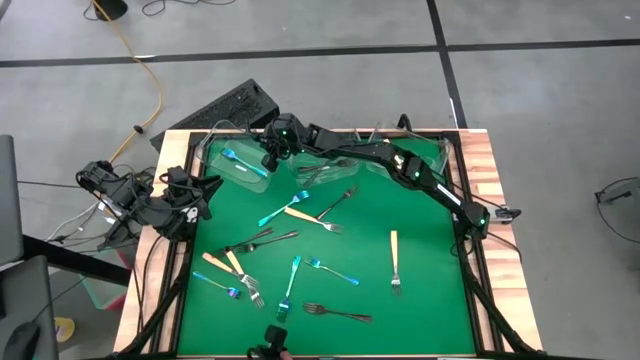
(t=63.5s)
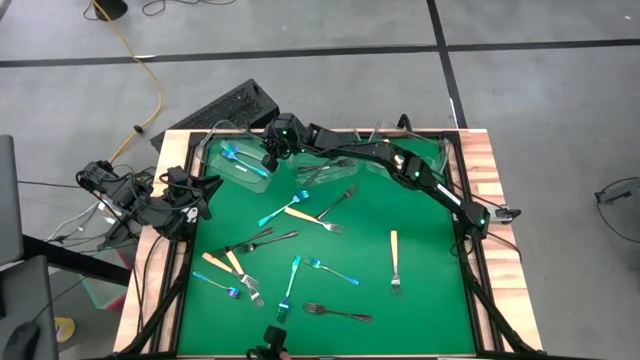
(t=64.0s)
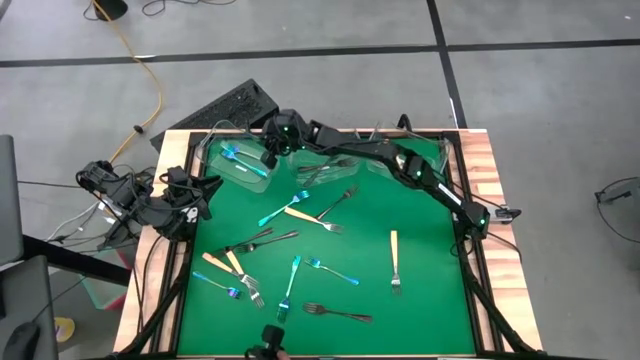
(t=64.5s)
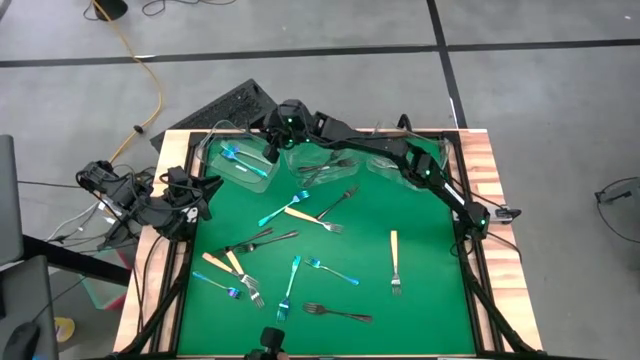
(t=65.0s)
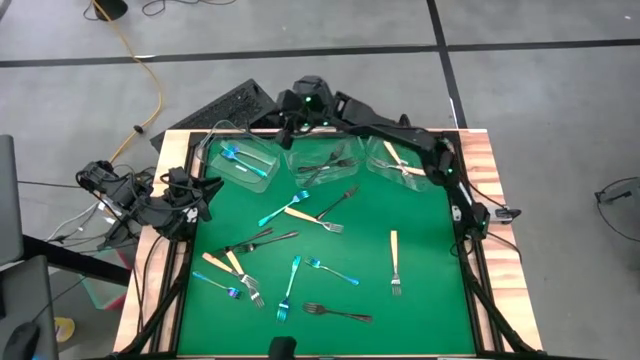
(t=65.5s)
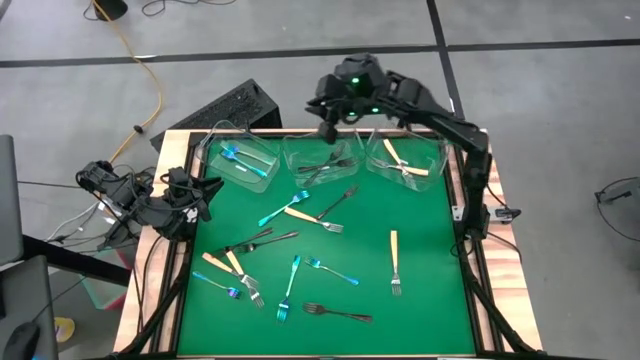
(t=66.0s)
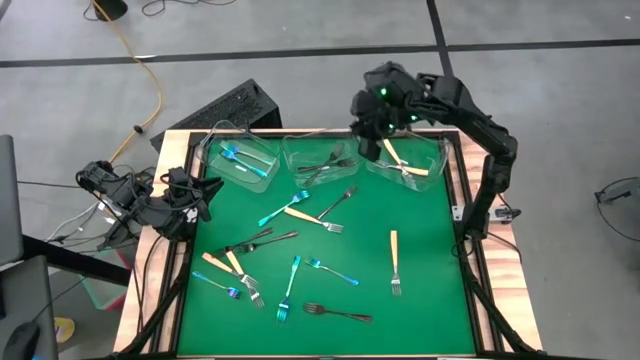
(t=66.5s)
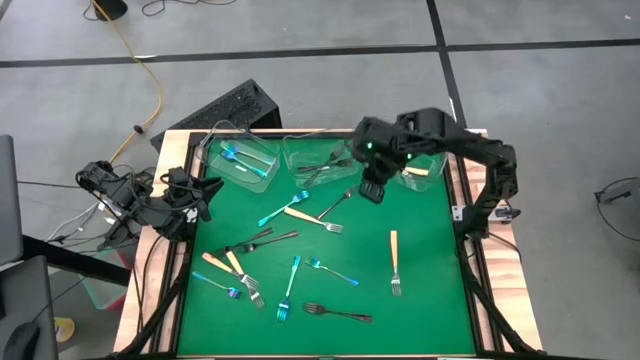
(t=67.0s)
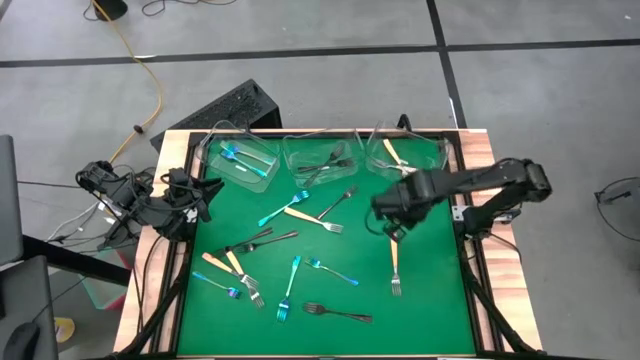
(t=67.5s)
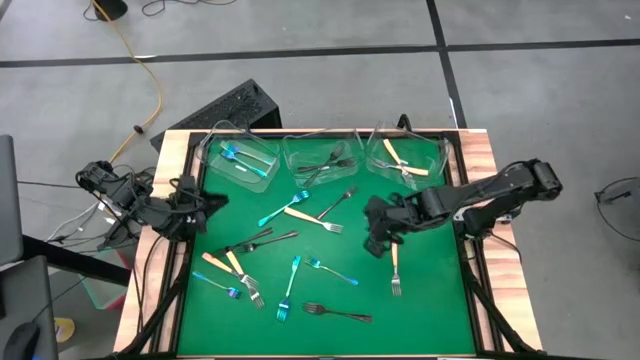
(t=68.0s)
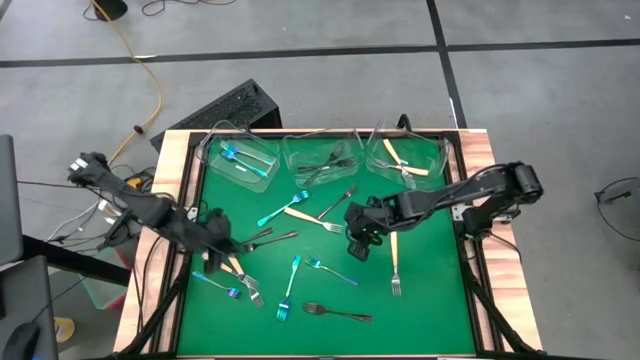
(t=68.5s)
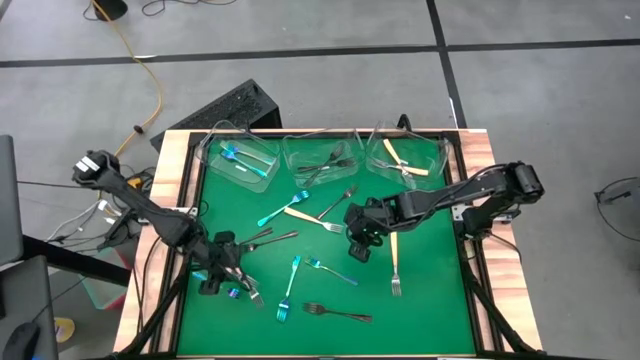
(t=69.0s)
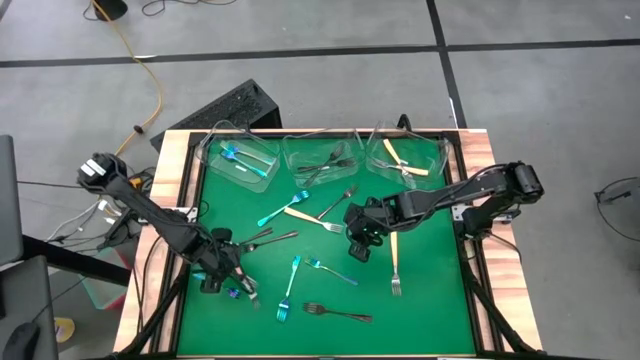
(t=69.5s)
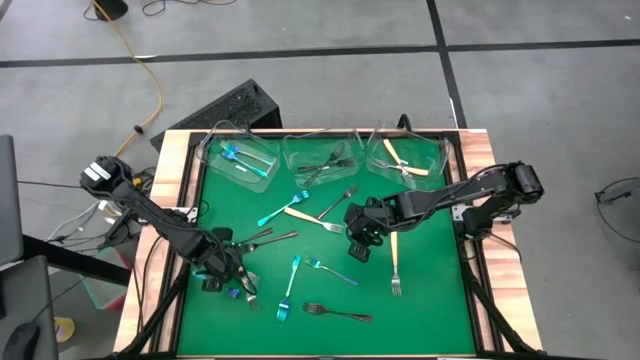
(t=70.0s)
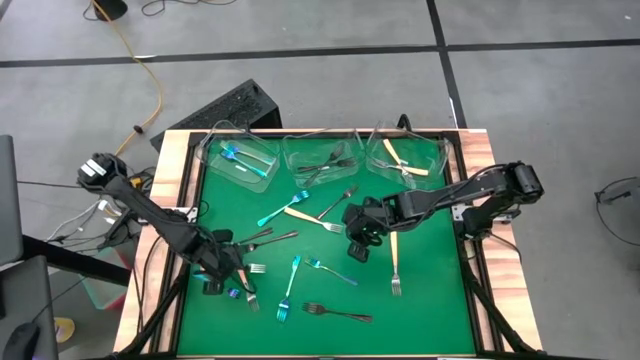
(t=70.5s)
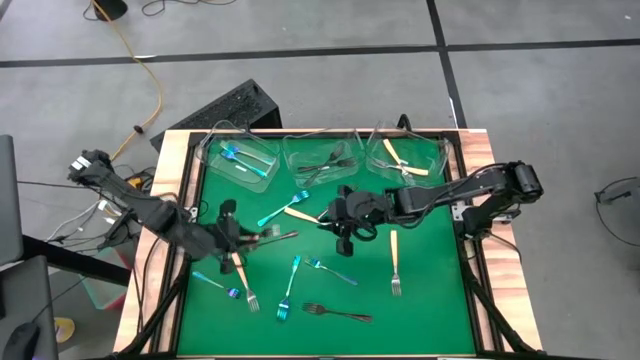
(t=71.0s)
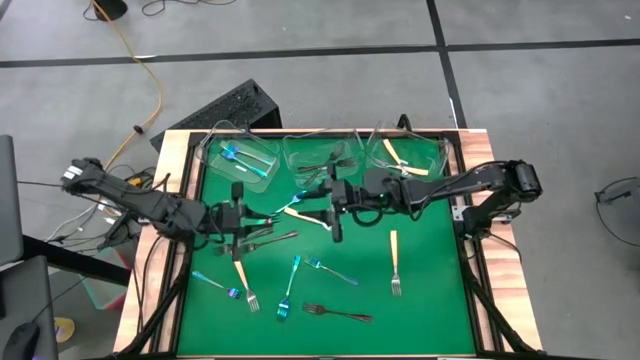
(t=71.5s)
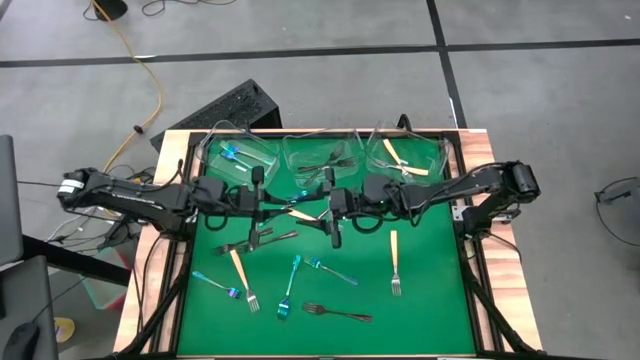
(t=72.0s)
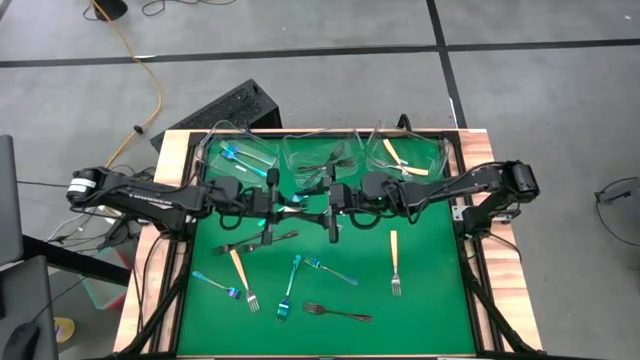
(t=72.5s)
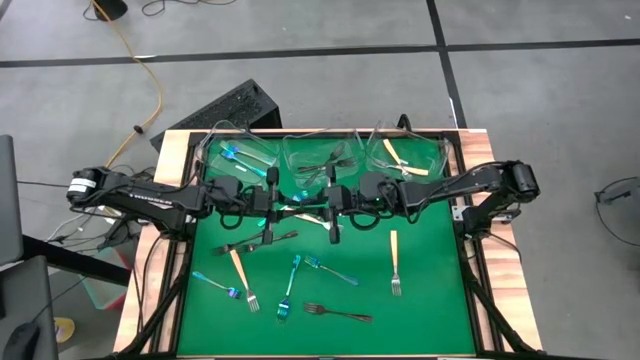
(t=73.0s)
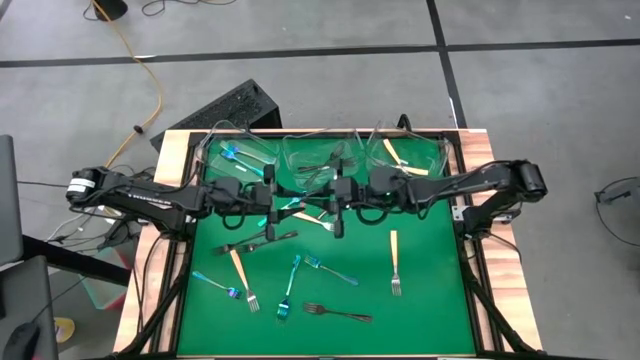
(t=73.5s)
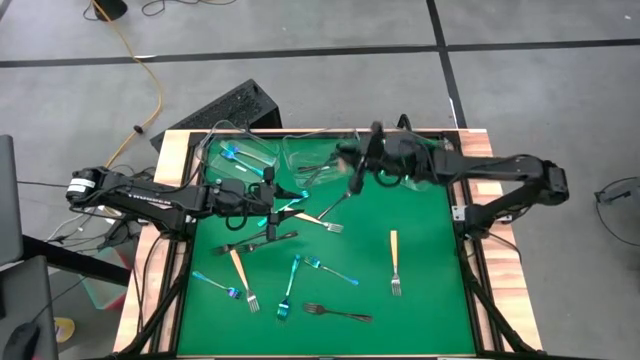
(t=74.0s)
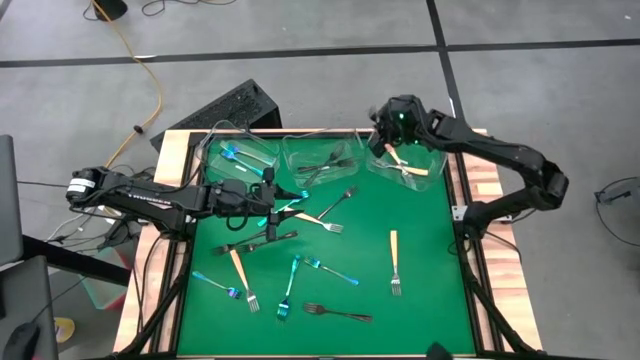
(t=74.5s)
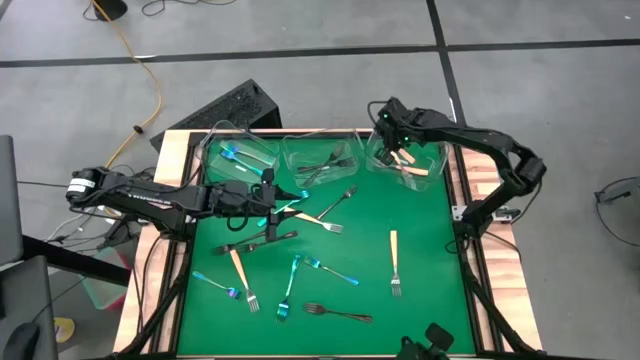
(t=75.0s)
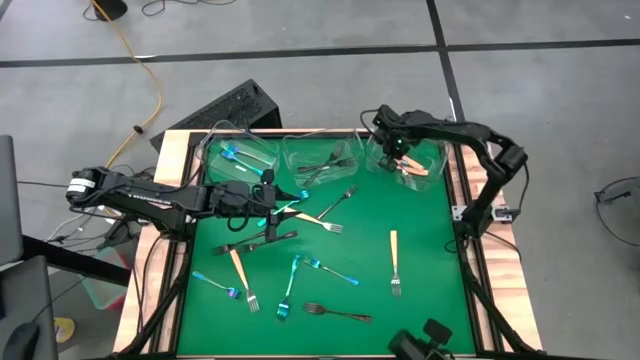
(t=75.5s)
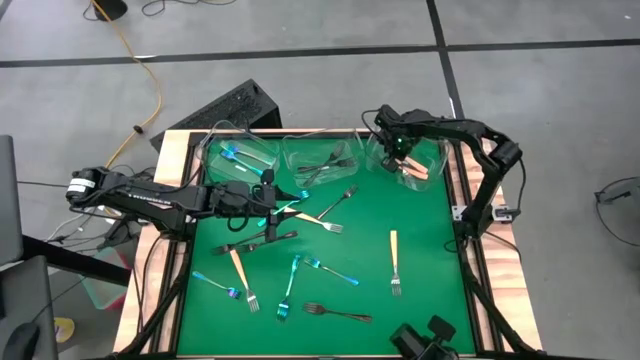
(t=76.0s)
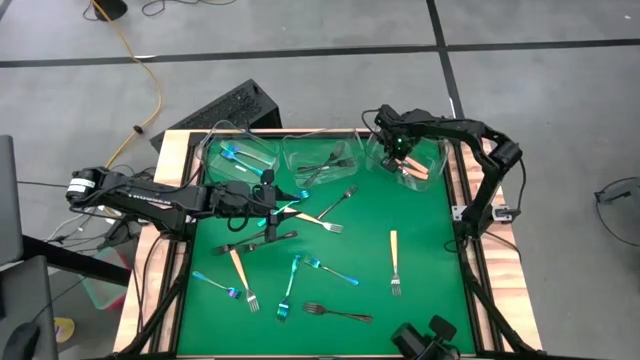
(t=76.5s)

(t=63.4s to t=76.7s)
Task: Sort silverware by color (type)
Put the yellow fork into the right transparent bin

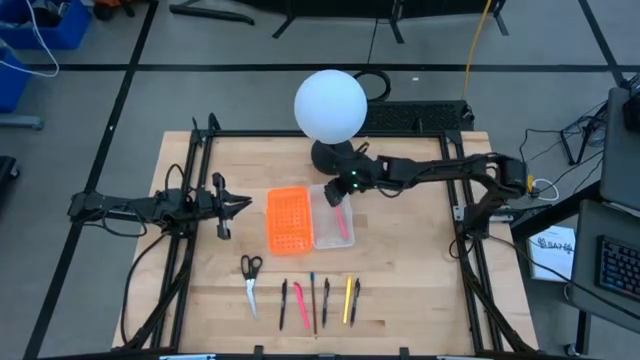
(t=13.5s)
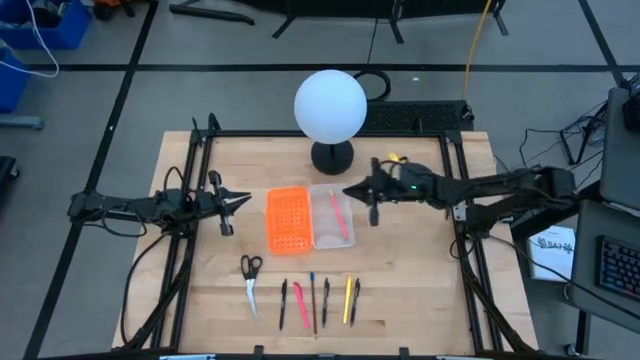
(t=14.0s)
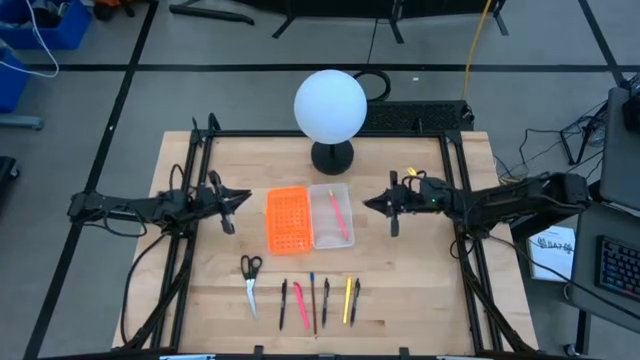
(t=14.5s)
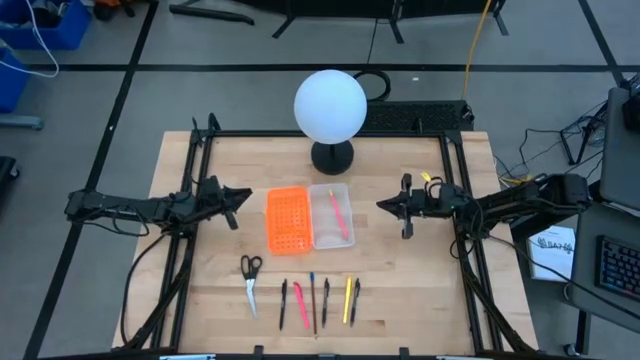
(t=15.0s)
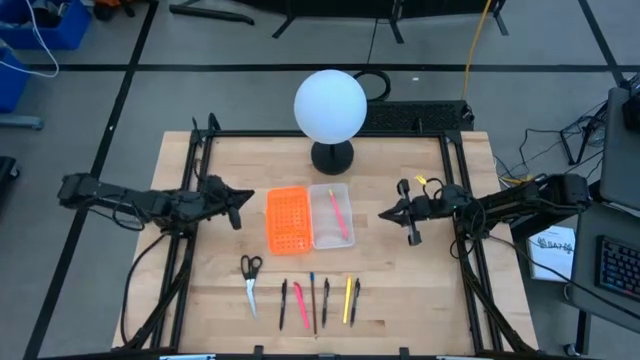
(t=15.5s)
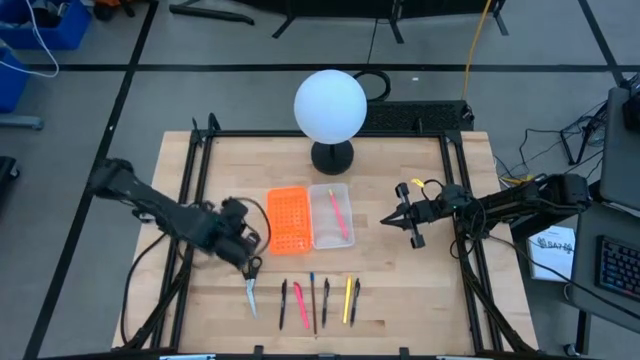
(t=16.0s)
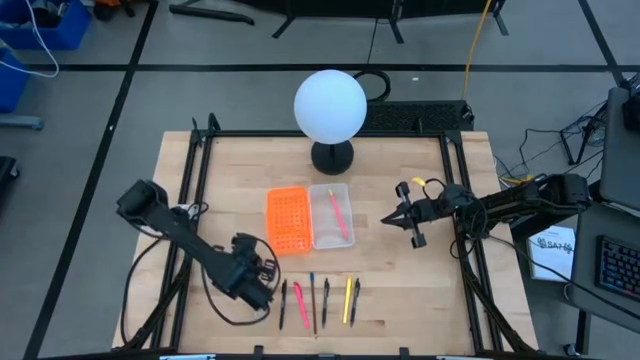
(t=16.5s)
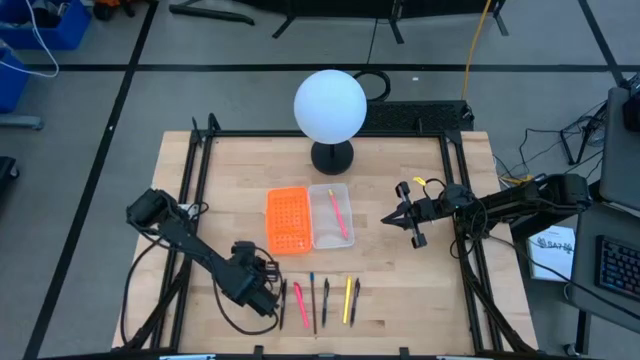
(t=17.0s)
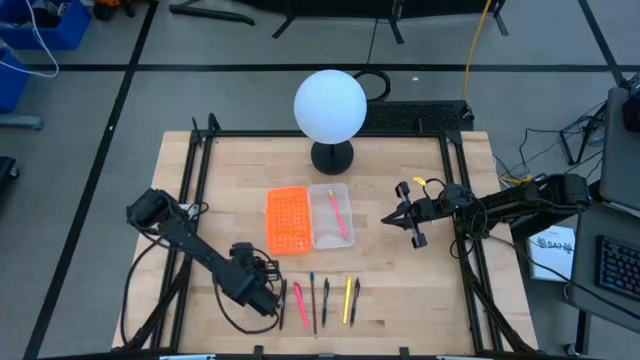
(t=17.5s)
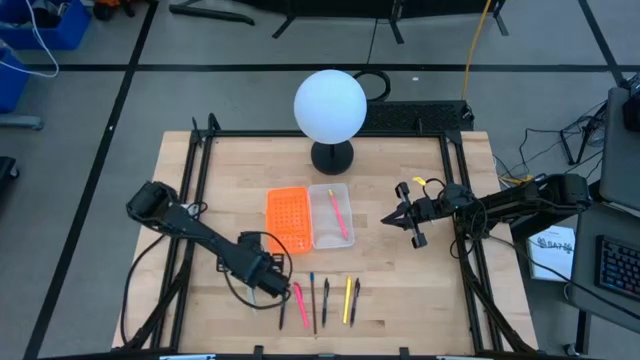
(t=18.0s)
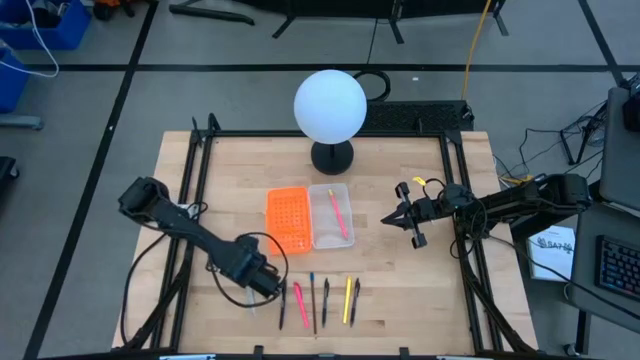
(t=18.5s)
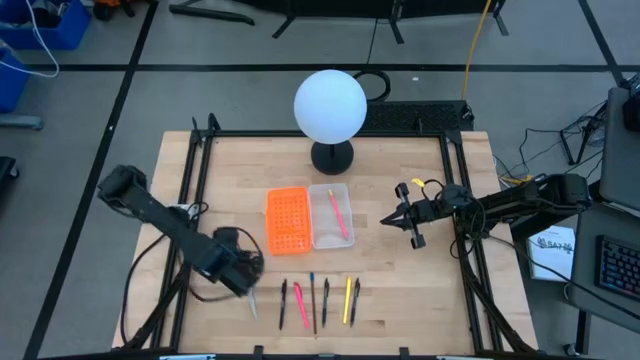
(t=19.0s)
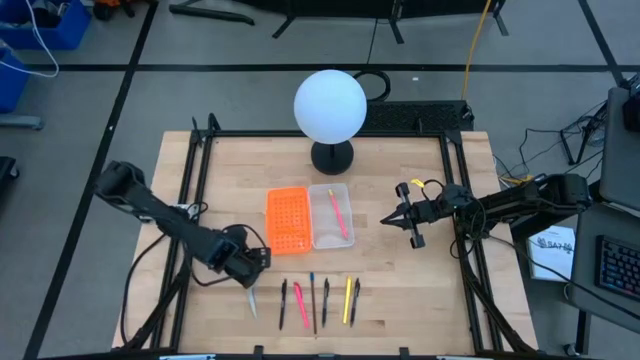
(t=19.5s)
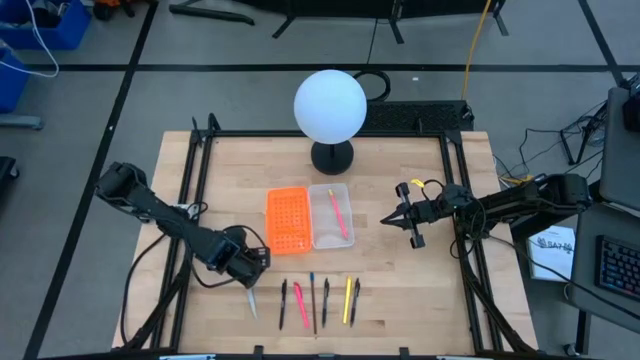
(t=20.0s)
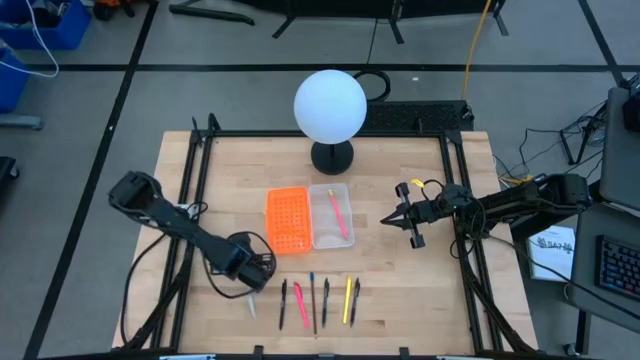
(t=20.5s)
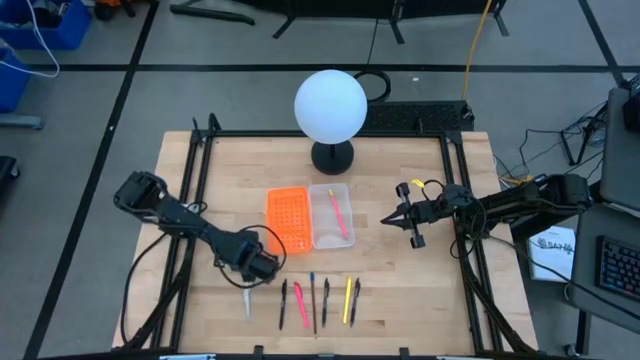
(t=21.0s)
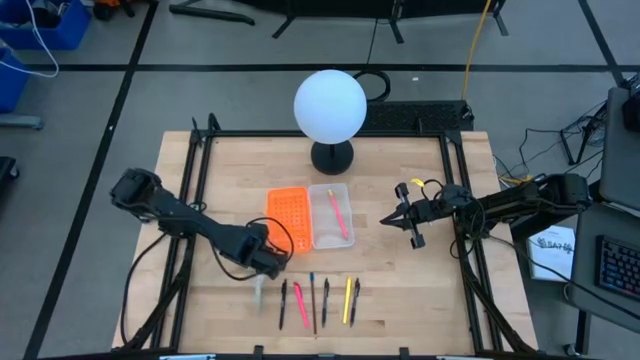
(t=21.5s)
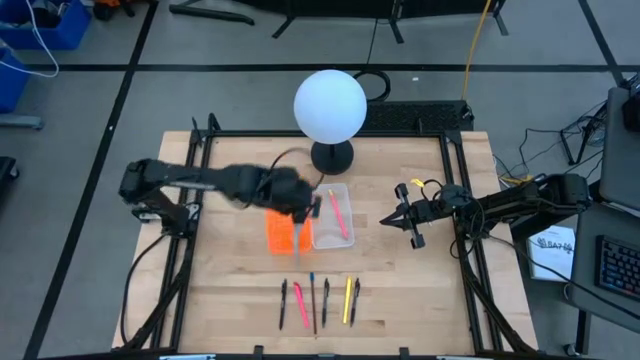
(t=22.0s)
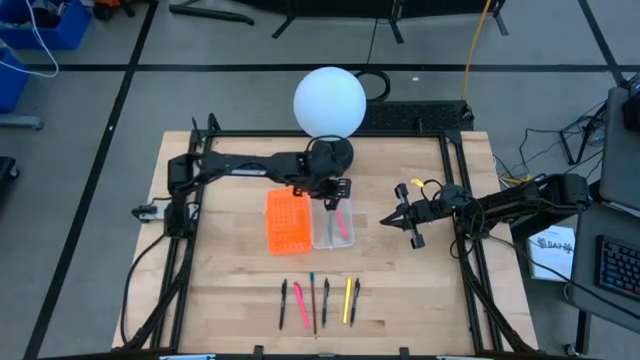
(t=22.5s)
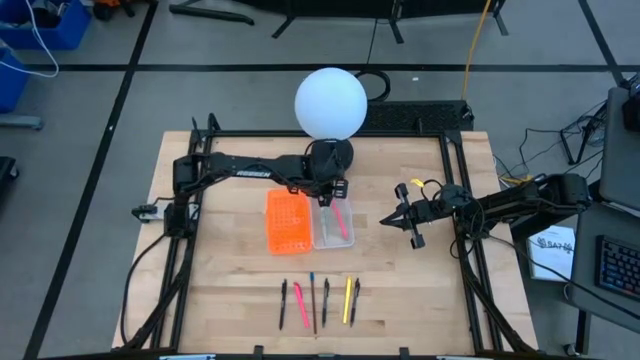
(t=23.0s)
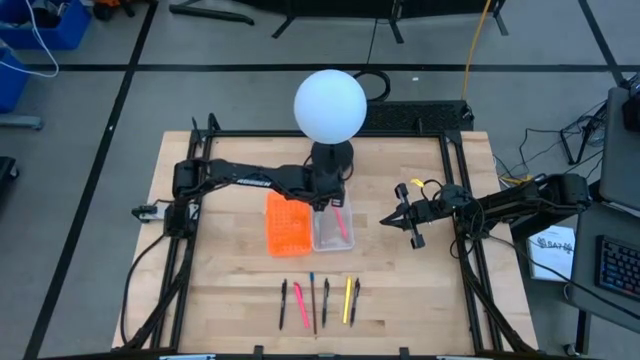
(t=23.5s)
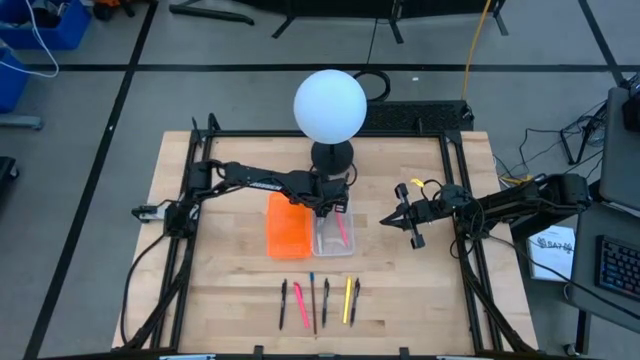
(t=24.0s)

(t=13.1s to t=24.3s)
Task: Pick & place school supplies into a supply box
Put the black scissors into the supply box
